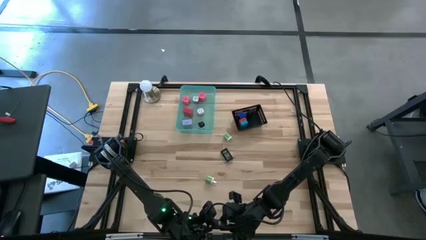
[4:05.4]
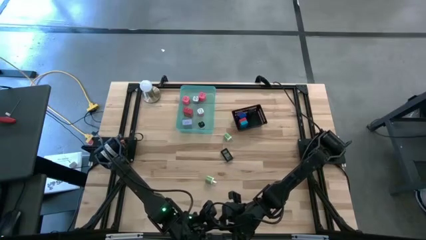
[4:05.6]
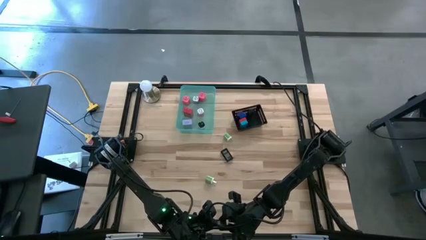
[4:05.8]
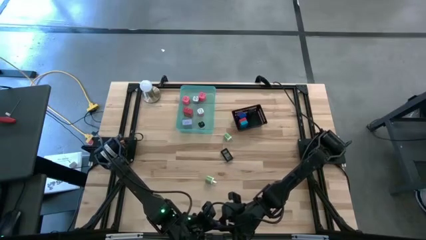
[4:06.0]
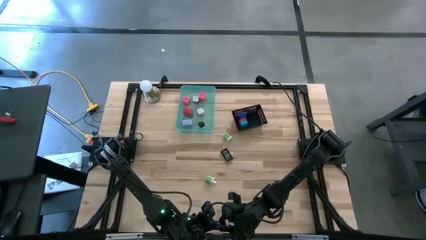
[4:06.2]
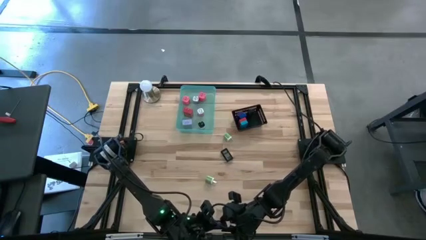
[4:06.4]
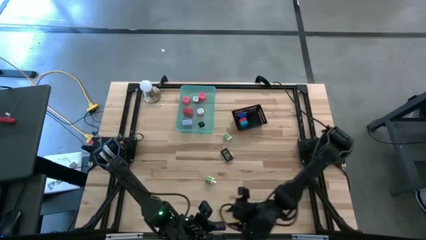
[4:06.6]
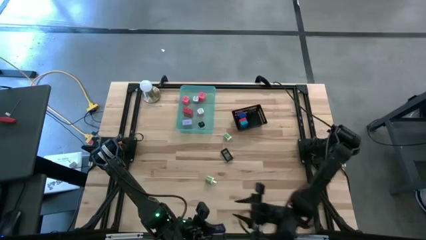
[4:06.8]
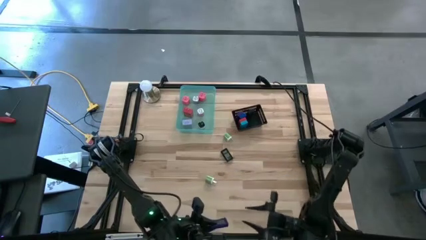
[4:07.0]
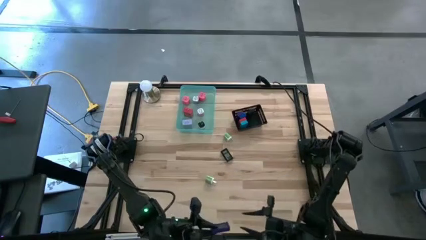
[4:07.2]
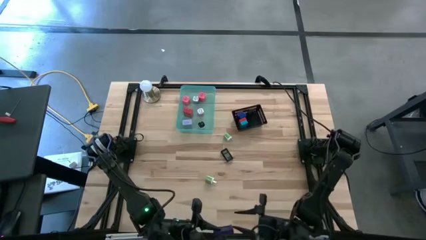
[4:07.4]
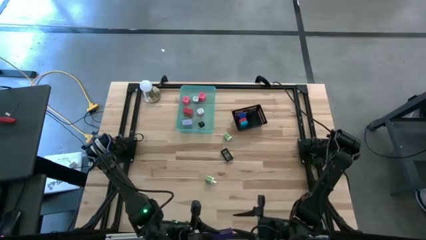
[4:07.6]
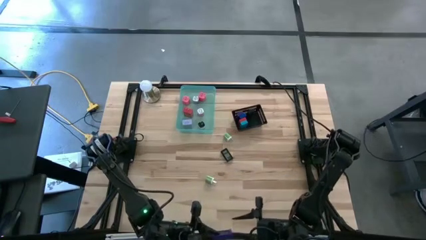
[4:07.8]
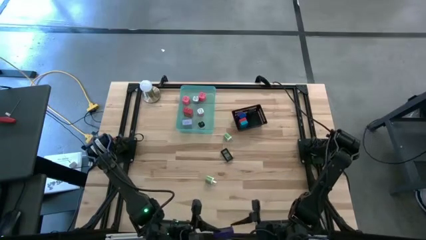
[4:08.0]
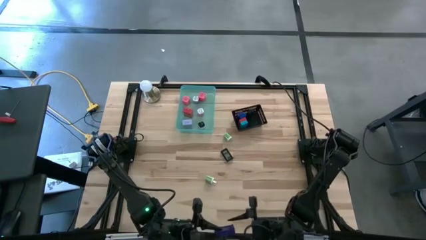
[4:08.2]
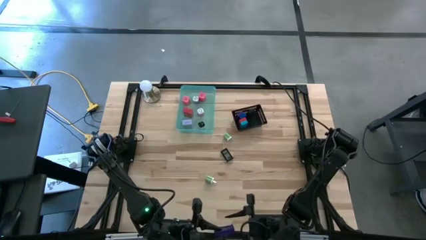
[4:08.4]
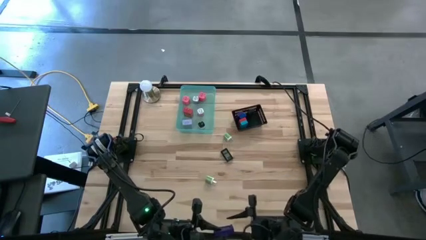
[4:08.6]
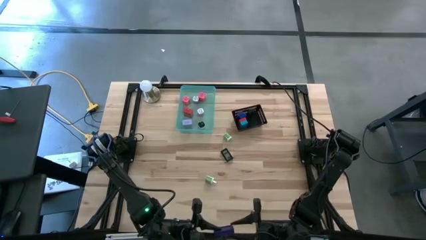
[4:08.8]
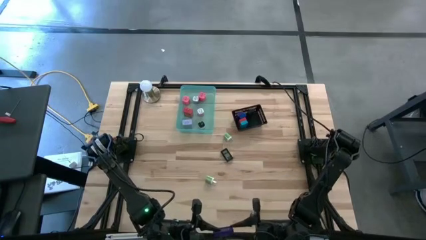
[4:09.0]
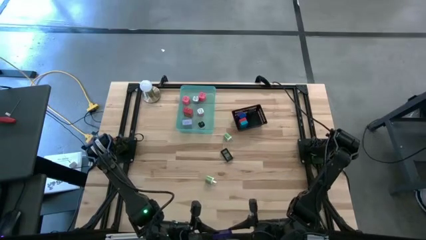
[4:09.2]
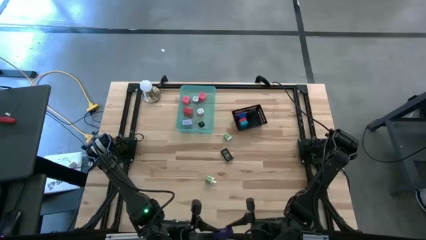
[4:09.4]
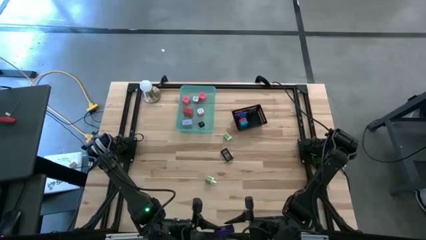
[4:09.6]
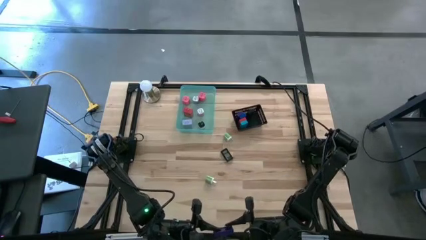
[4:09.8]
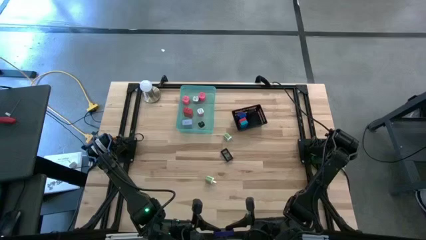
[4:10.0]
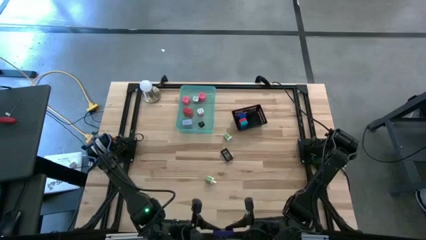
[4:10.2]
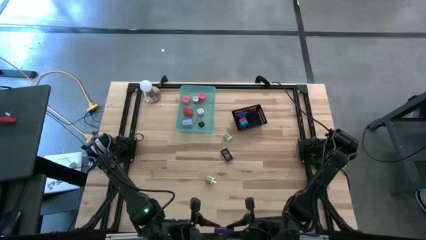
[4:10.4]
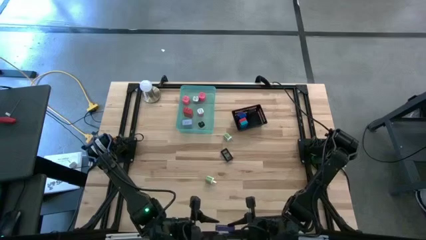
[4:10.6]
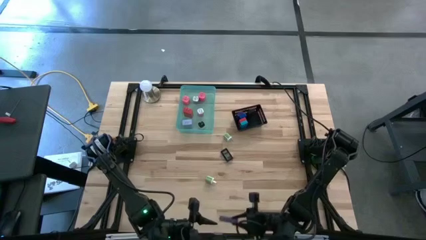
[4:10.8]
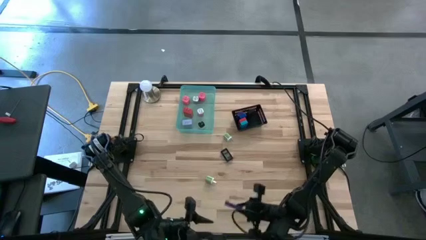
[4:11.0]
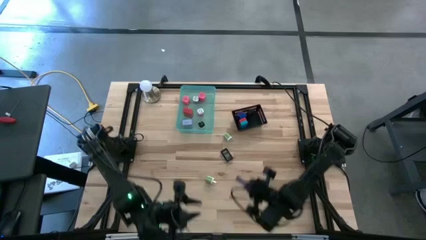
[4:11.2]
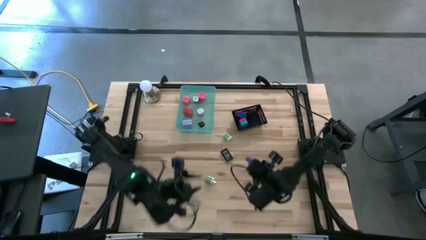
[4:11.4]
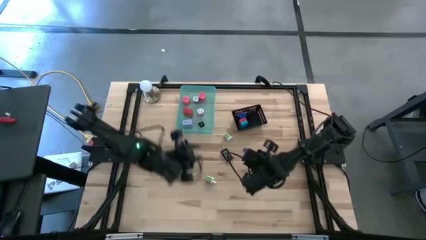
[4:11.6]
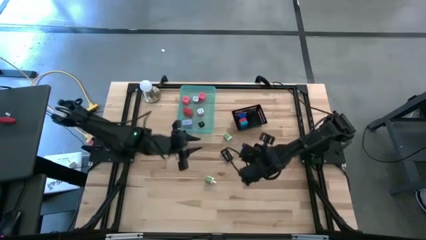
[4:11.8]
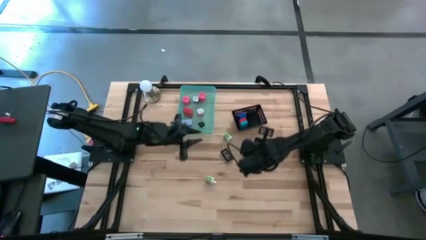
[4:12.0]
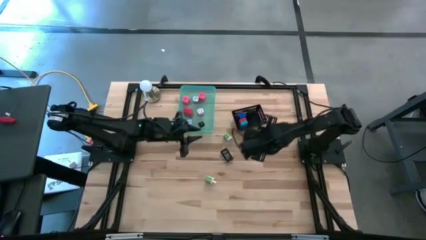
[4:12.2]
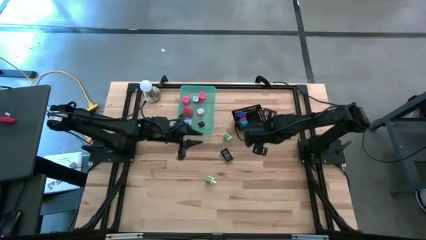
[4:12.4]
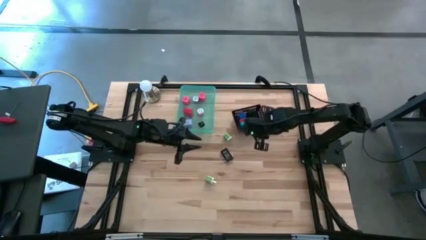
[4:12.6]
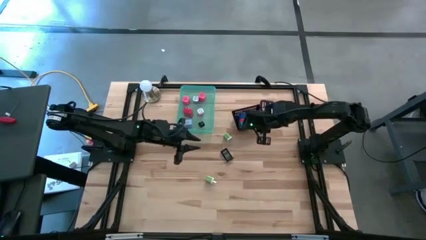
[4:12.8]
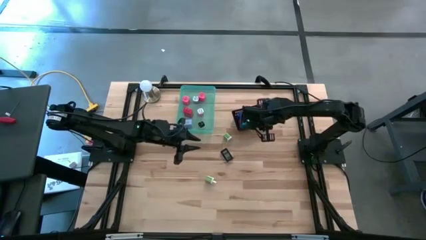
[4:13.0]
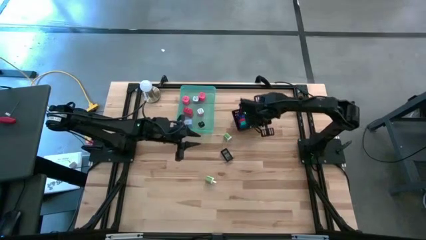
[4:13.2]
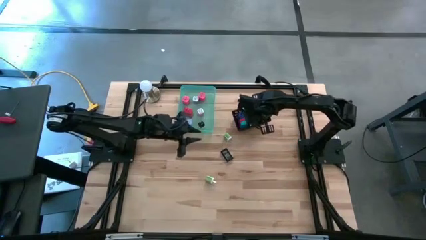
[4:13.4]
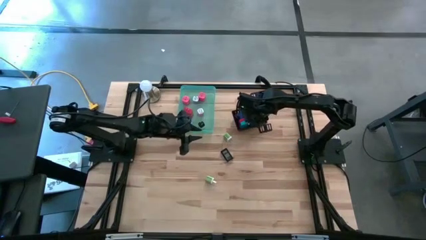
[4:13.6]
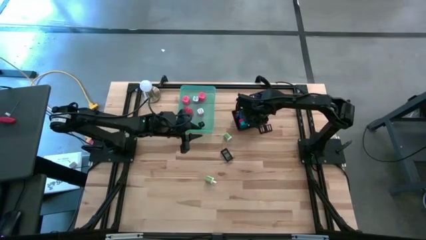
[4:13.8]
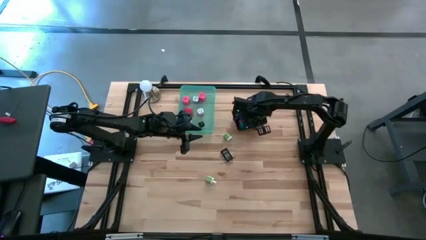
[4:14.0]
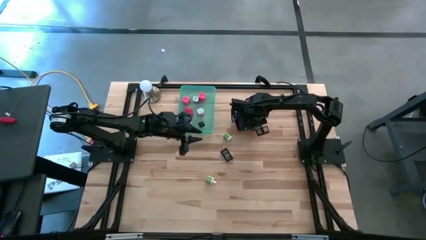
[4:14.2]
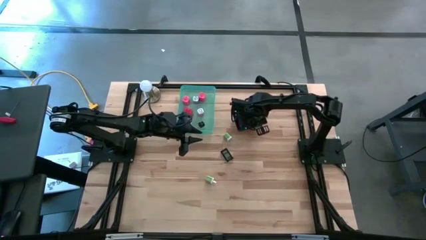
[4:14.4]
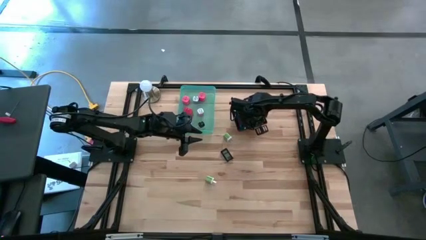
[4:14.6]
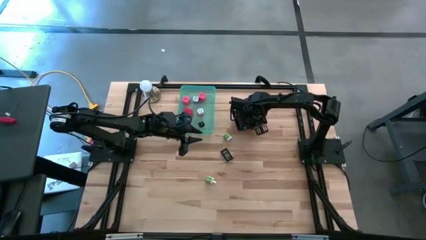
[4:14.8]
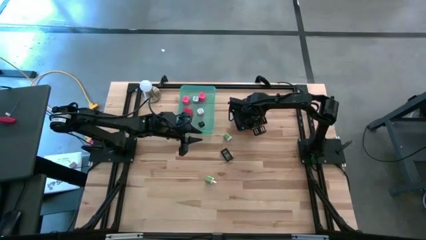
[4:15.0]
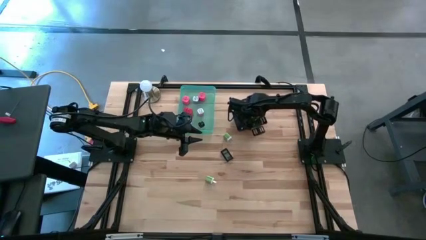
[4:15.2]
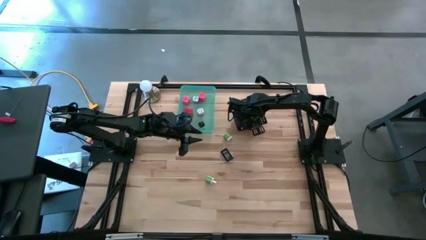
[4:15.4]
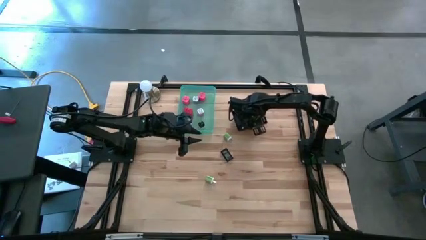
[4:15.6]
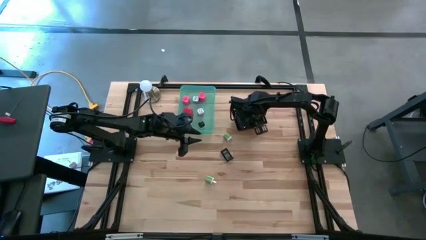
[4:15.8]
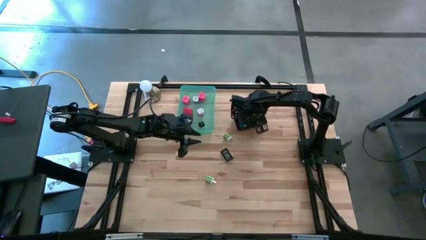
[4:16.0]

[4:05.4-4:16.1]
Task: Pick & Place Office items
Put the dark blue digital clock into the black bin

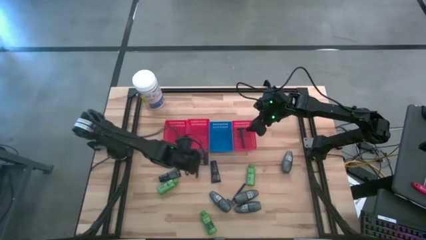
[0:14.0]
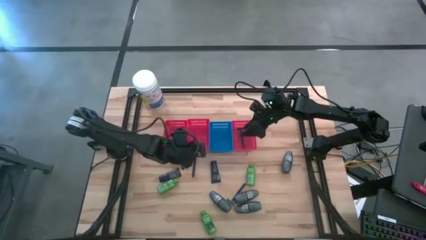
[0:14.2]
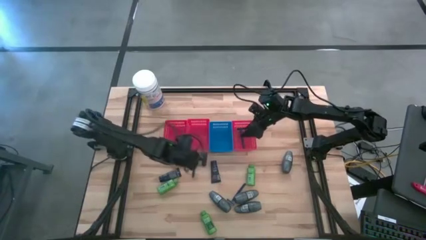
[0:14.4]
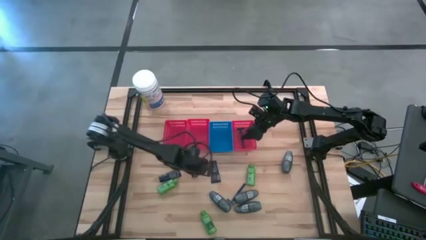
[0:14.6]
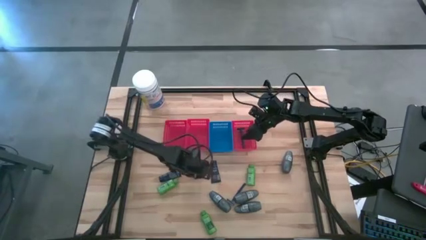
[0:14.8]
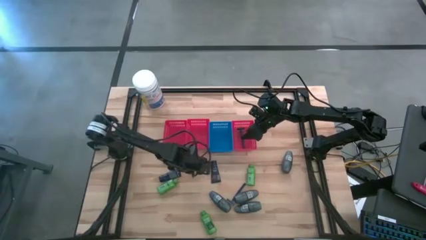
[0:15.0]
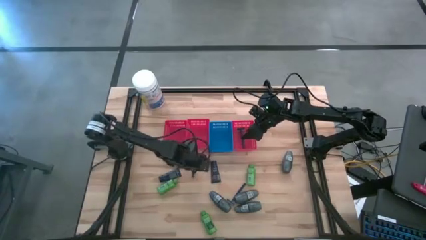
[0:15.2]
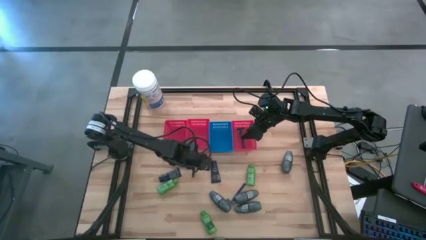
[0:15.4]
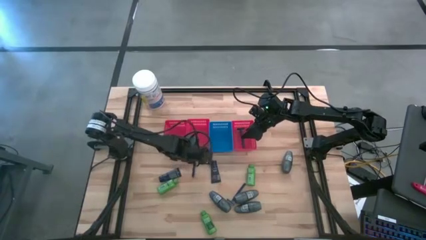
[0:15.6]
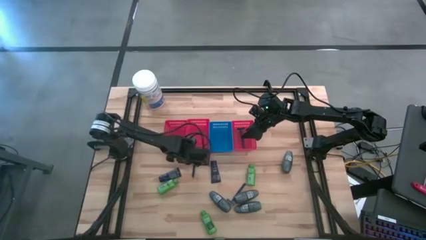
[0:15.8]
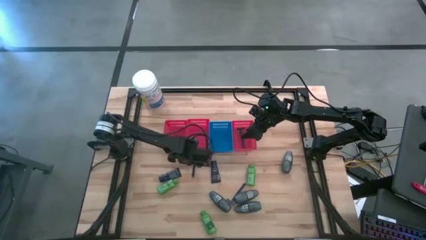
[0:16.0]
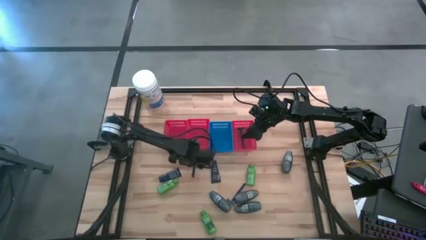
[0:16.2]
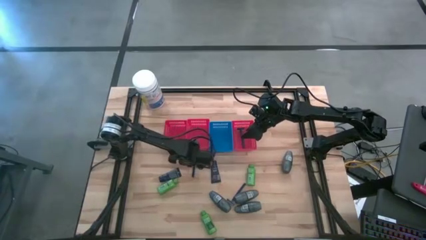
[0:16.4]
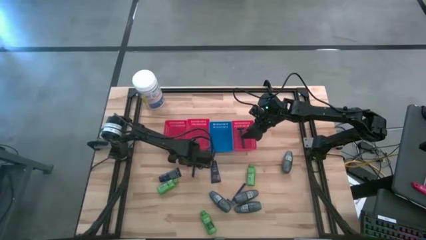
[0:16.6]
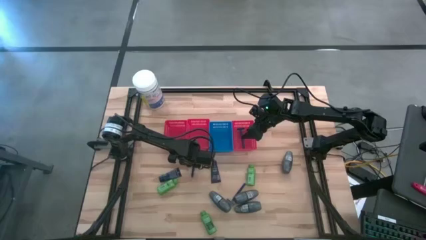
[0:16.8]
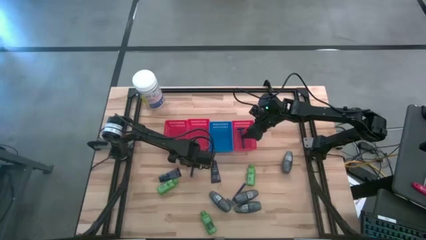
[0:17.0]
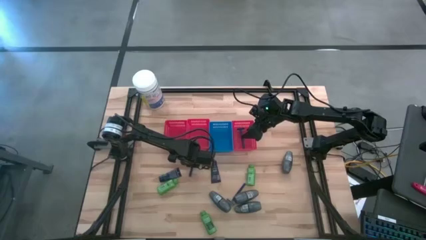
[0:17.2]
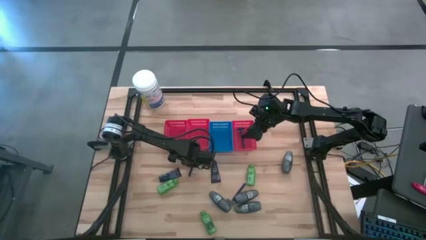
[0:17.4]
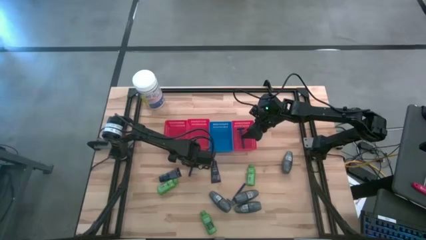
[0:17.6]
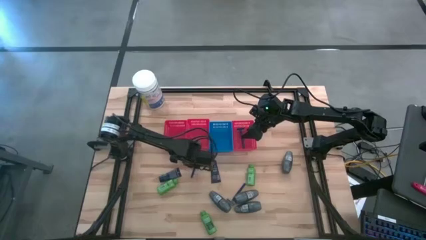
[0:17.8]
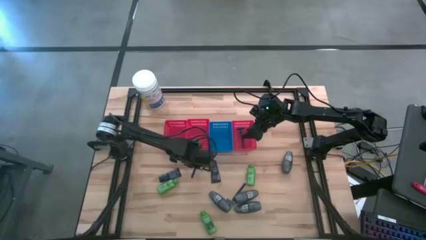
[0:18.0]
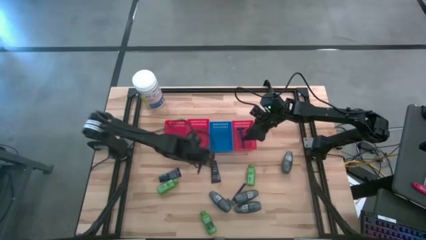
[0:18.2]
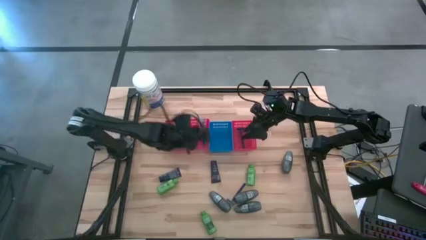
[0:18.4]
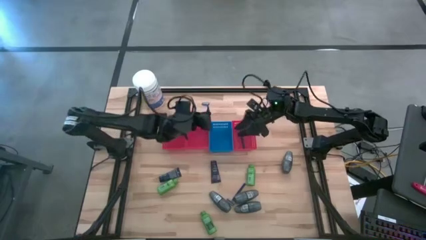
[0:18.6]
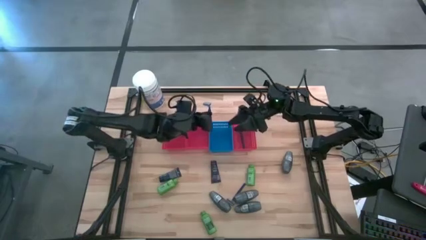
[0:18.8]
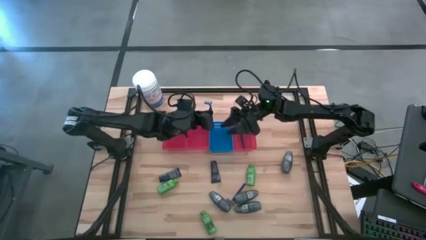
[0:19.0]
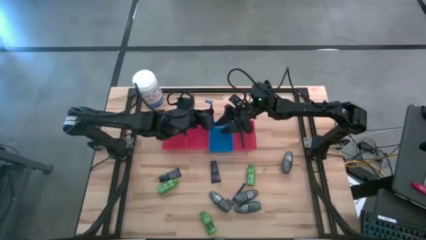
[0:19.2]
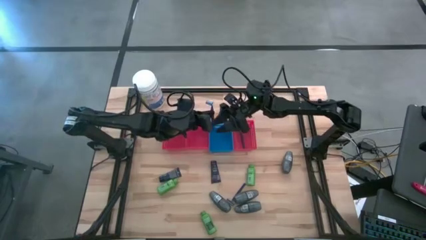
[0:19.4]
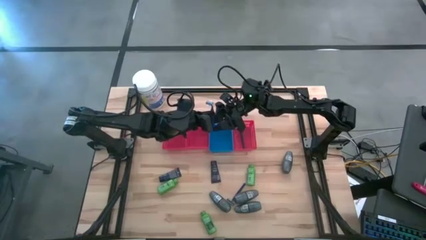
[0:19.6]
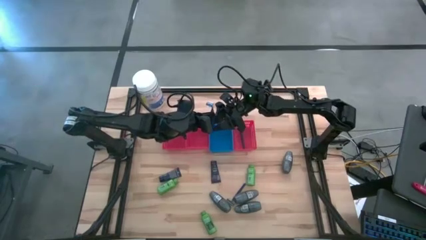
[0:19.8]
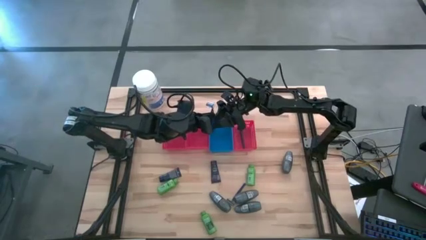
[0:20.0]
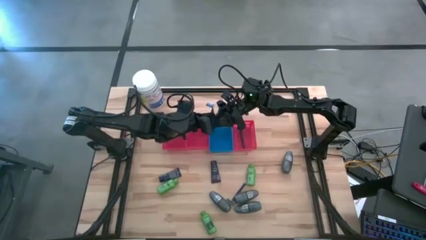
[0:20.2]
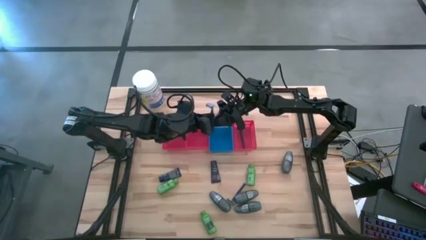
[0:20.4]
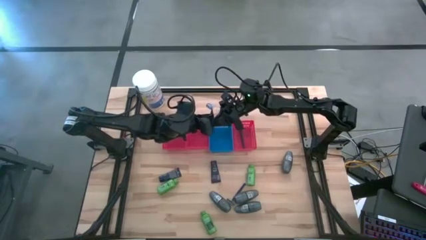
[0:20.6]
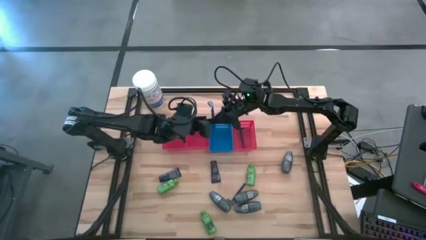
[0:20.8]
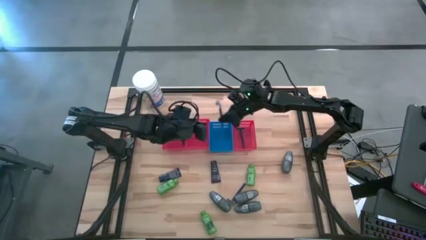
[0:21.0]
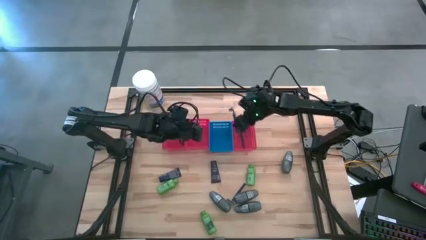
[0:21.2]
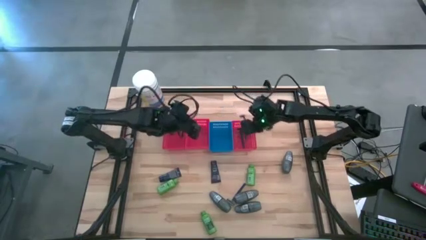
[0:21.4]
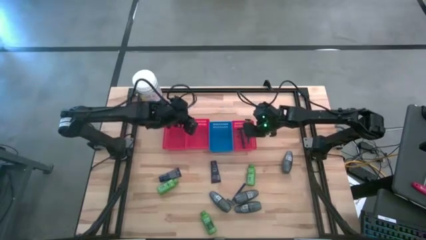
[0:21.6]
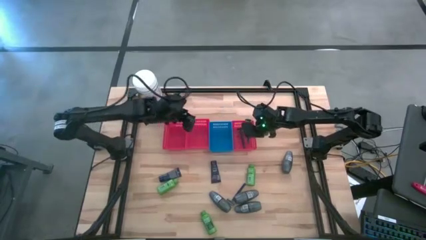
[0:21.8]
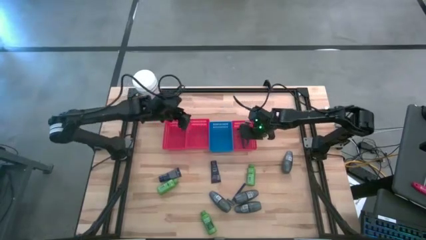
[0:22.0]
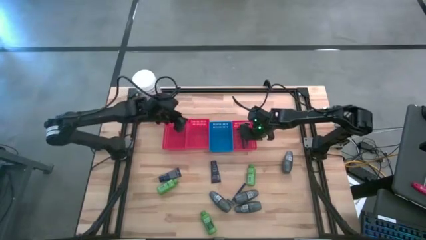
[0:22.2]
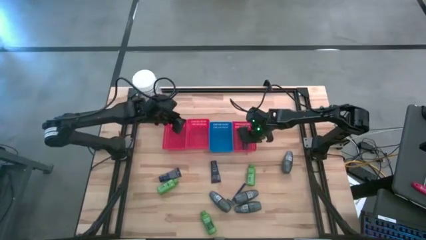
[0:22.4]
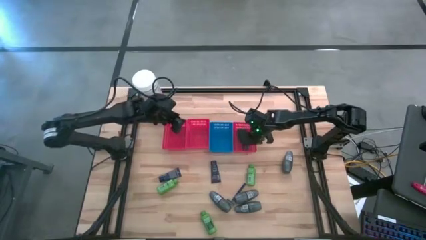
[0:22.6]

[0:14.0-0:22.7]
Task: Pick & Place Travel size toiletries
Put the blue razor into the right red bin
